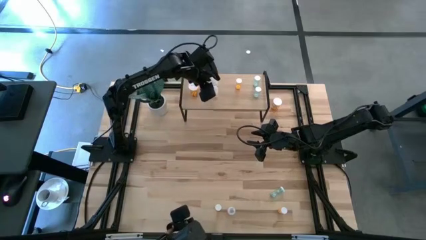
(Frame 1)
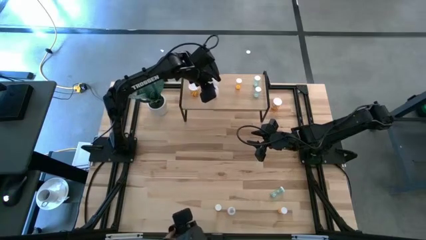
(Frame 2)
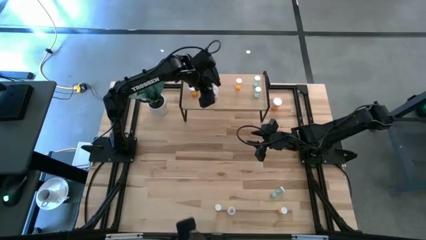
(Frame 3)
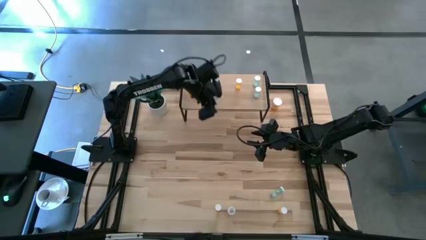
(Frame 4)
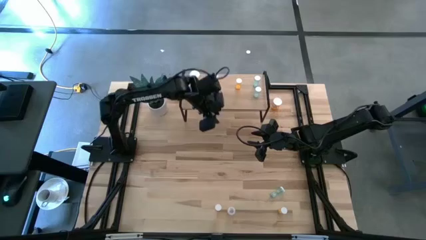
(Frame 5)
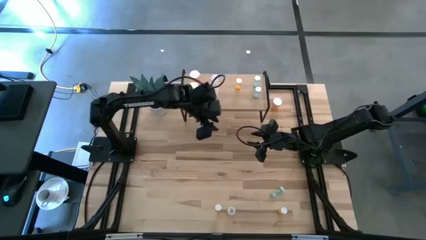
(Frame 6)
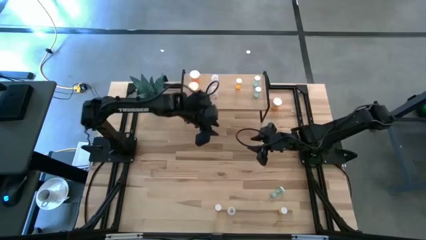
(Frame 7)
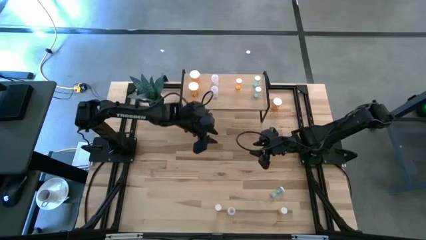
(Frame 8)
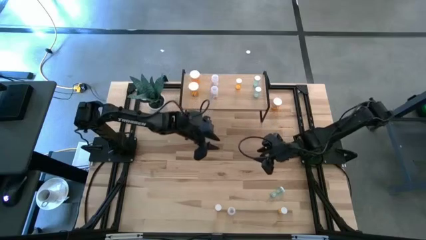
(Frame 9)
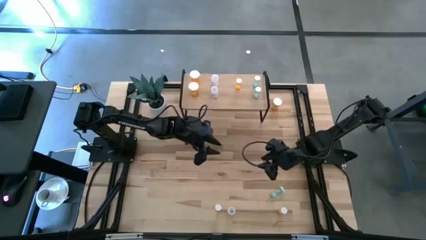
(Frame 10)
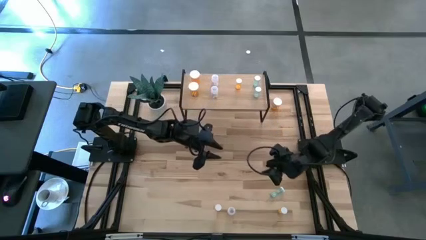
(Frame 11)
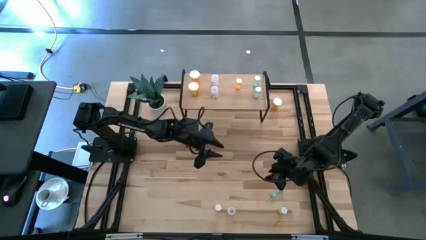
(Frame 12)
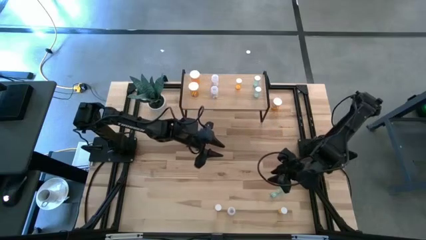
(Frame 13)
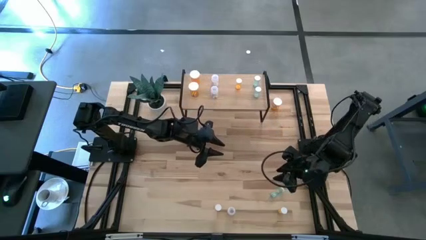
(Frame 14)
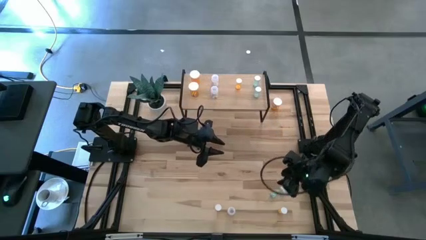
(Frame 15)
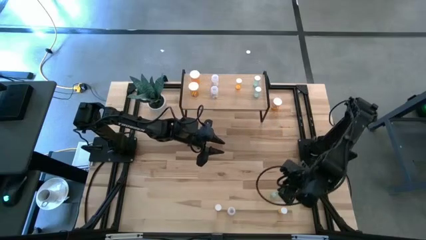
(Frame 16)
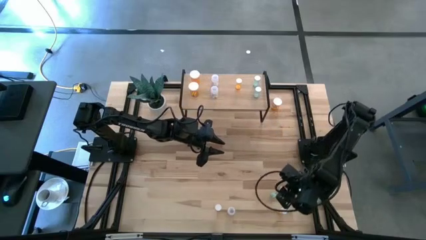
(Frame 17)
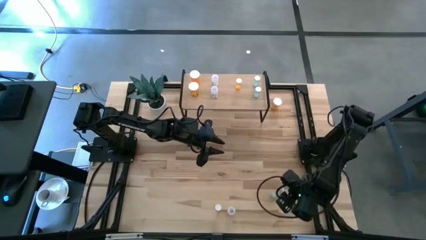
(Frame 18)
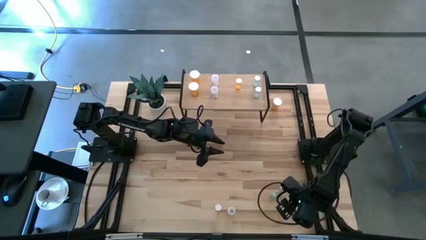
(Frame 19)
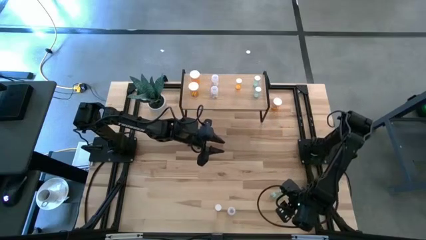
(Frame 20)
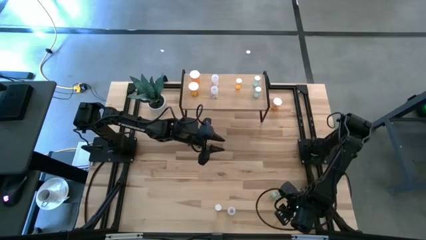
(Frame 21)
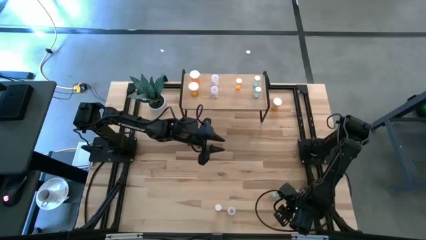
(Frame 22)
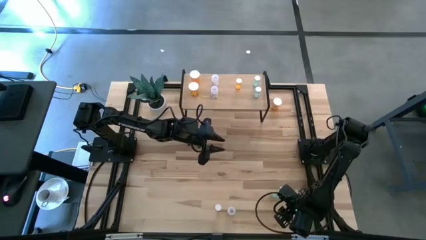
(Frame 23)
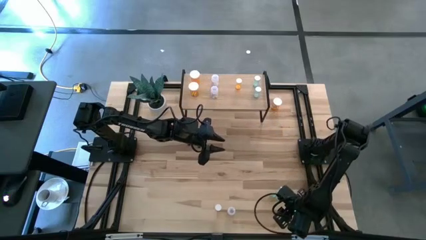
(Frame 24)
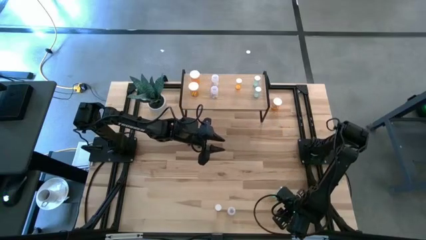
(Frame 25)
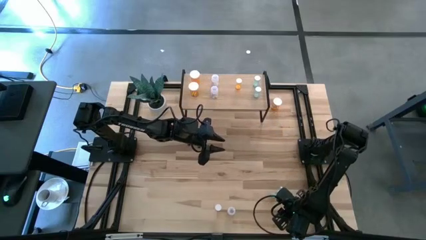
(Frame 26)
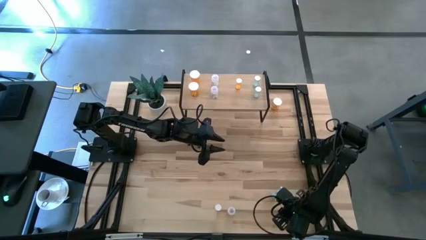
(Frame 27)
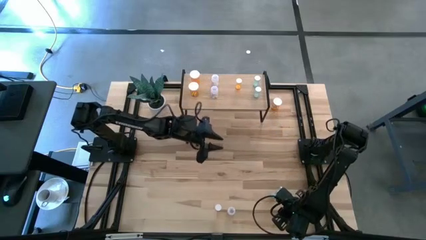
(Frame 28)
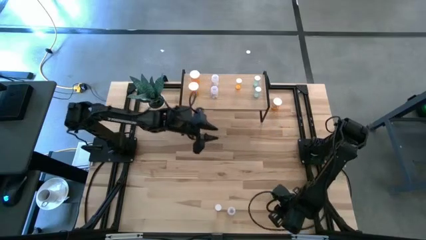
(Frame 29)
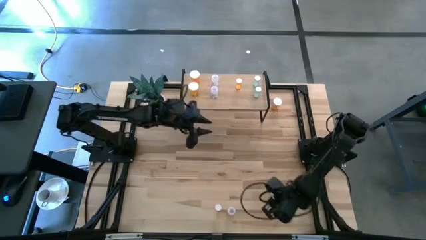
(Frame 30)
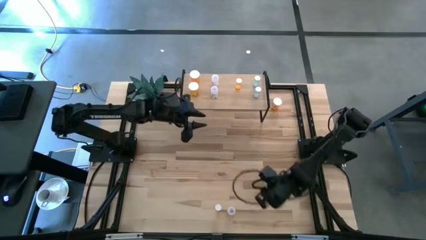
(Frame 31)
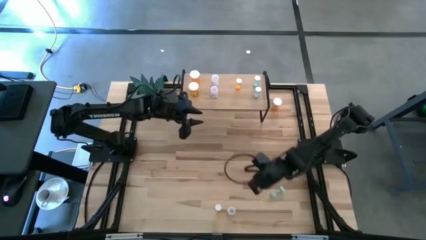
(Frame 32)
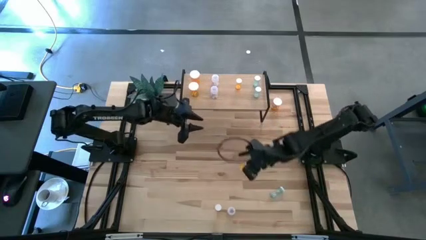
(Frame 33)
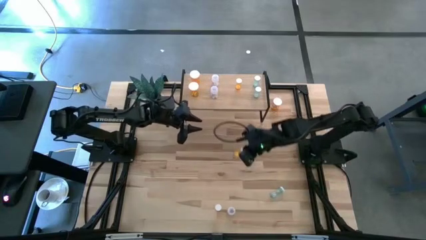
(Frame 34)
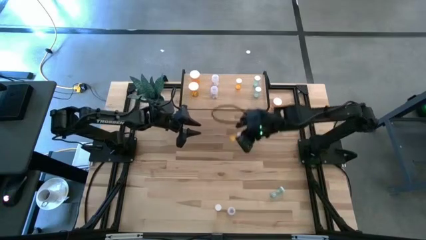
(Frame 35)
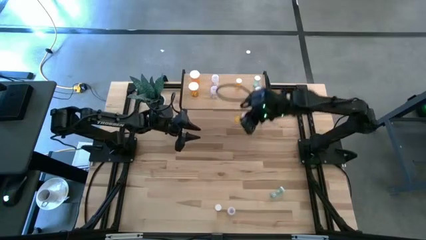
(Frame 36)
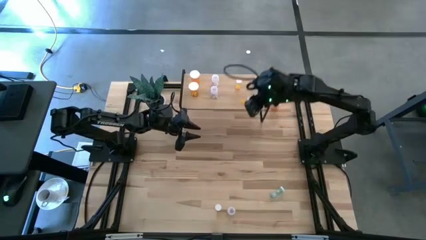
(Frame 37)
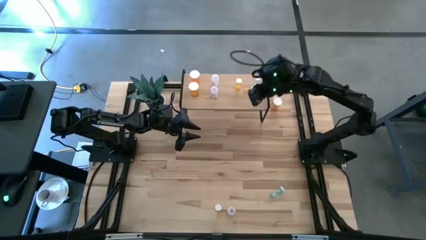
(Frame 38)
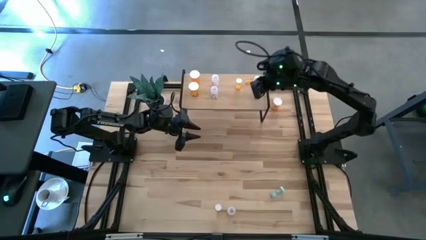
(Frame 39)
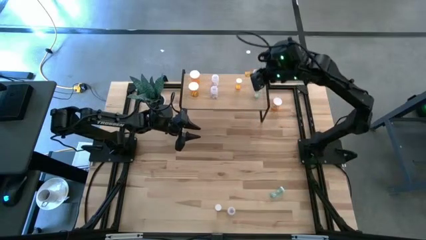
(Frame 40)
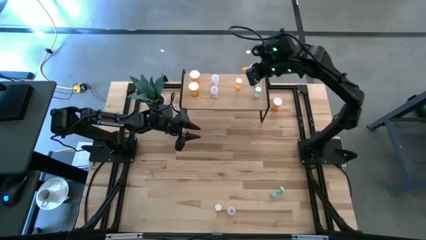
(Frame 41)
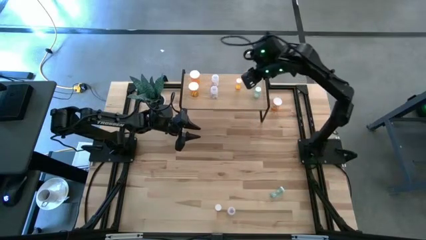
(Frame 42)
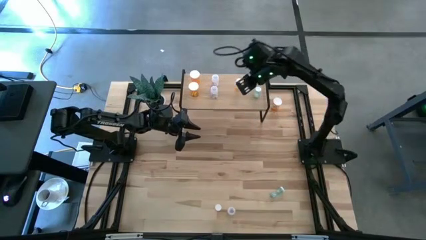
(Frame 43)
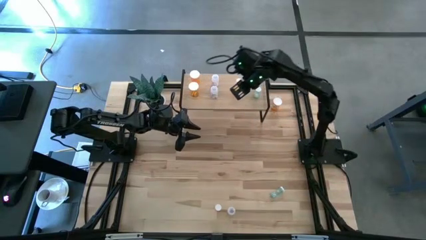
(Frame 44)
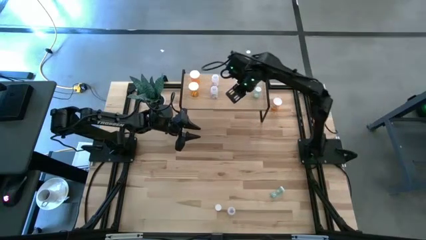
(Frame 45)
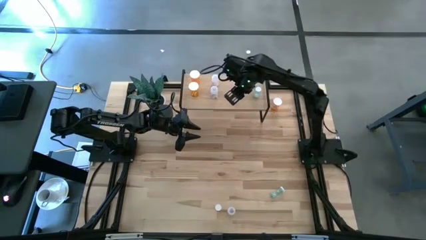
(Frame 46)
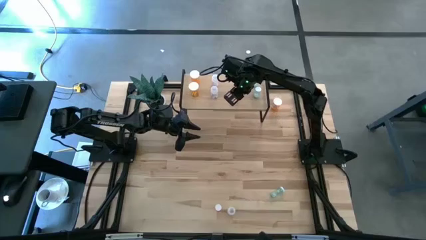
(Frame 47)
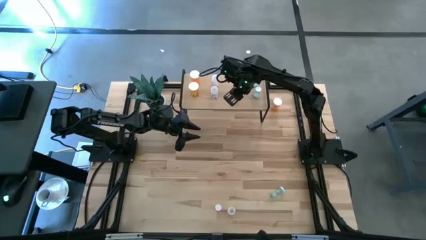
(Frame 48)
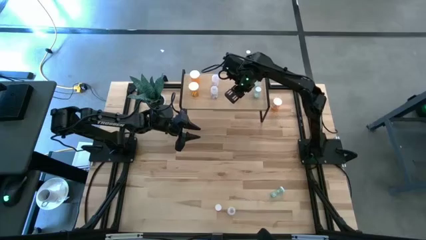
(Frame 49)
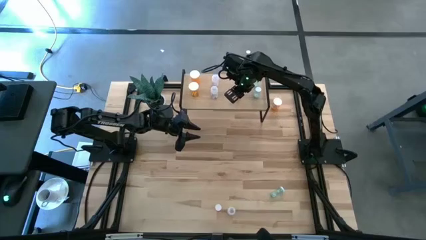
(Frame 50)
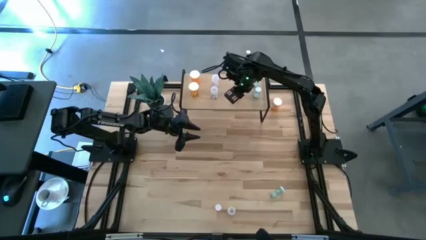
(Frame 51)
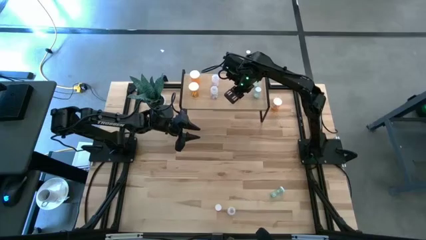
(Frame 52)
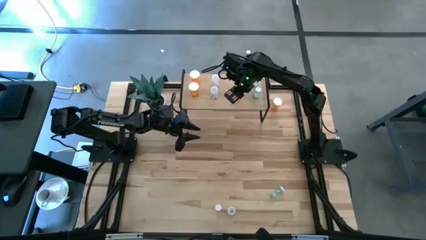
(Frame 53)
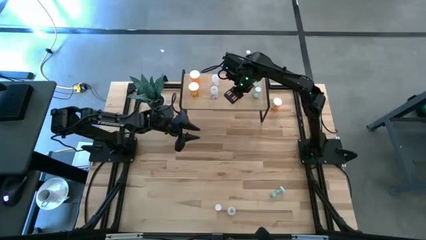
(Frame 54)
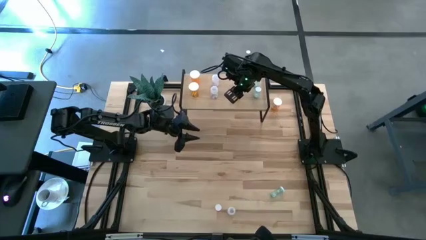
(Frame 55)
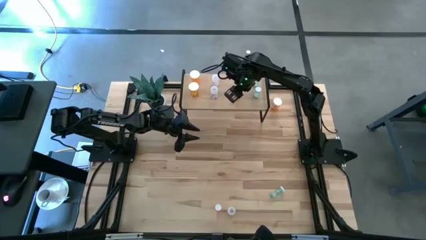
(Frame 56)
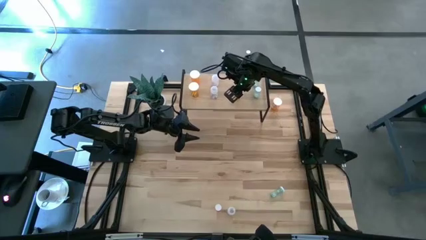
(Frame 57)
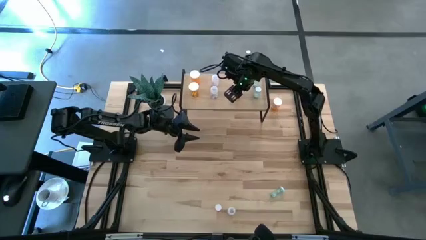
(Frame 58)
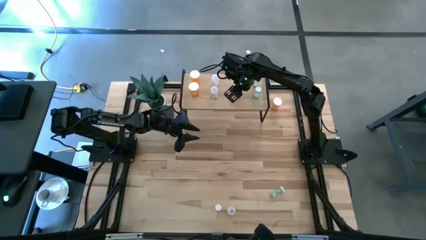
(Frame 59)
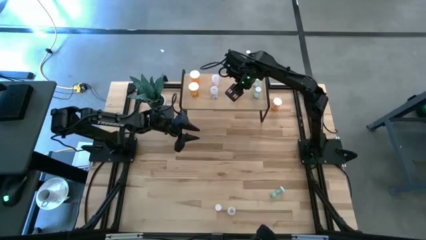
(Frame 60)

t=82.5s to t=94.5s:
Task: Pick and place medicine bottles onto shelf by color
Put the right small orange pill bottle aligned with the other small orange pill bottle on the shelf
